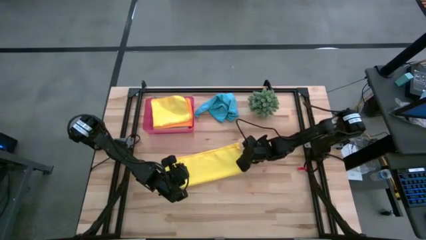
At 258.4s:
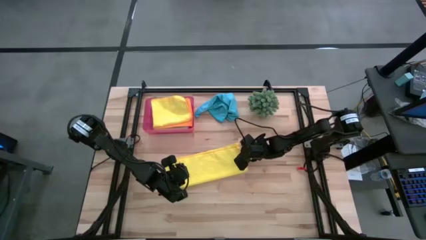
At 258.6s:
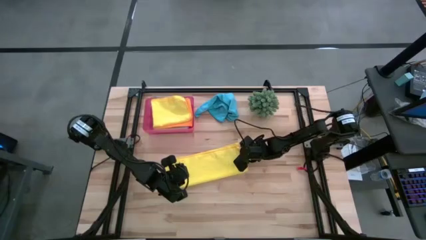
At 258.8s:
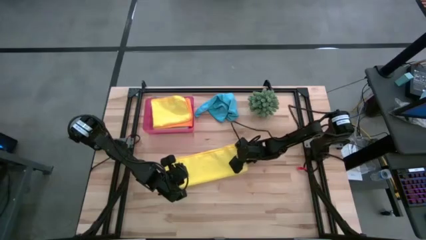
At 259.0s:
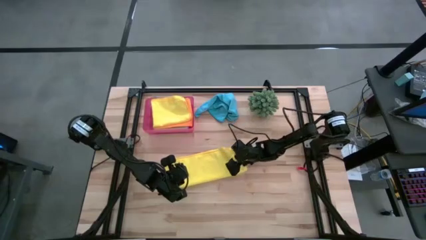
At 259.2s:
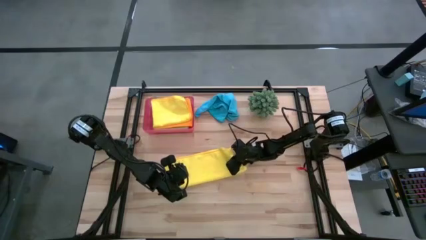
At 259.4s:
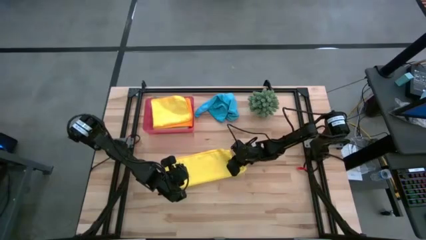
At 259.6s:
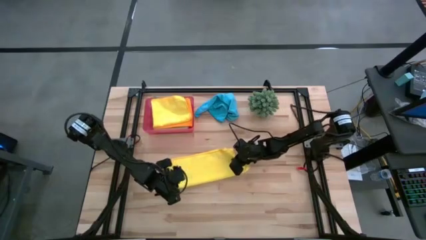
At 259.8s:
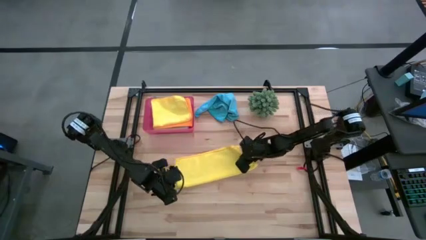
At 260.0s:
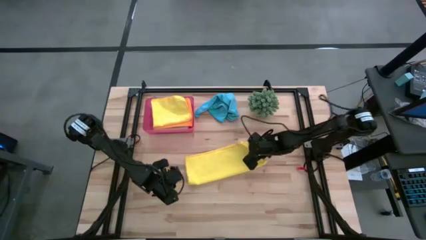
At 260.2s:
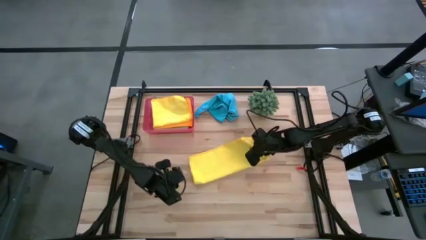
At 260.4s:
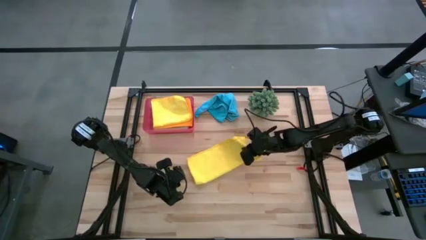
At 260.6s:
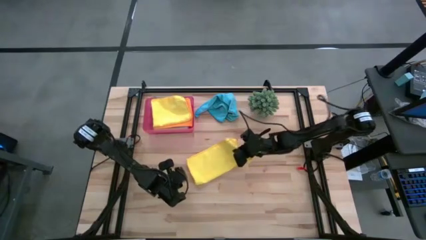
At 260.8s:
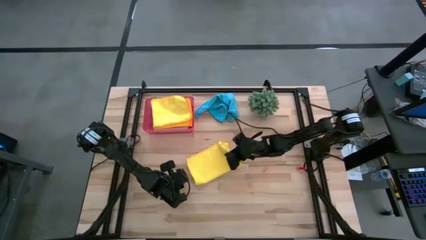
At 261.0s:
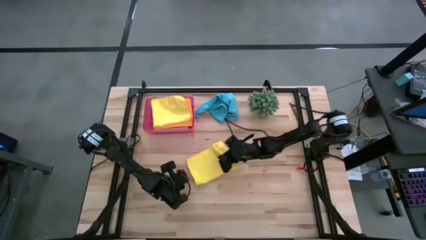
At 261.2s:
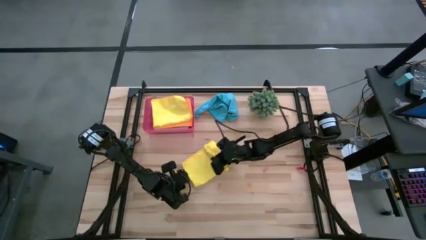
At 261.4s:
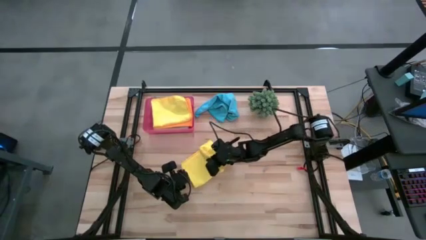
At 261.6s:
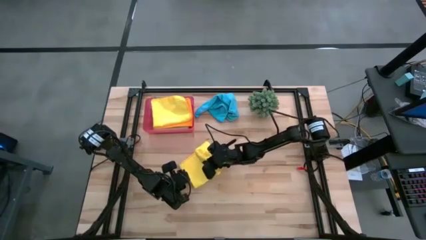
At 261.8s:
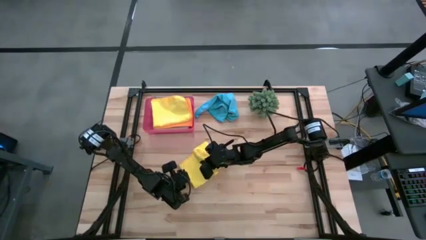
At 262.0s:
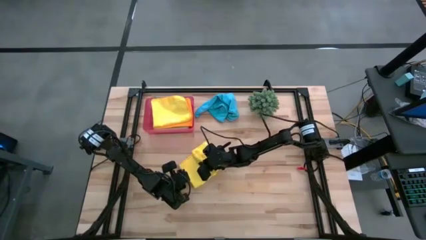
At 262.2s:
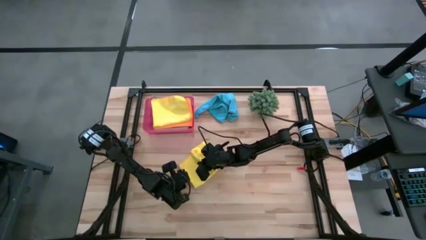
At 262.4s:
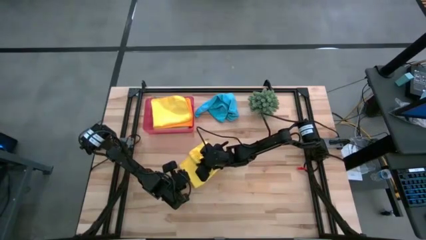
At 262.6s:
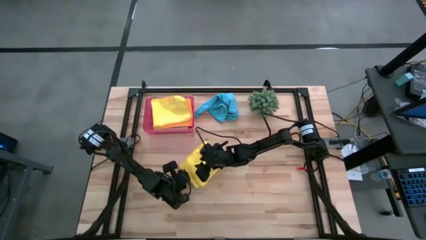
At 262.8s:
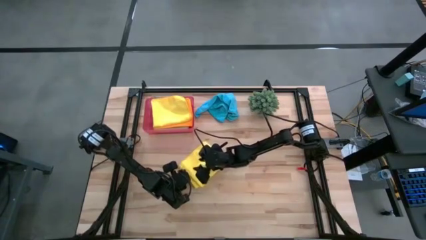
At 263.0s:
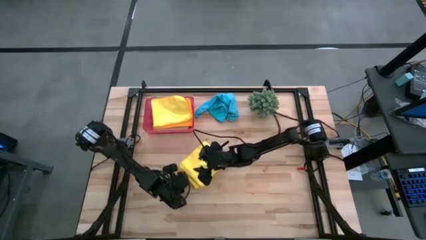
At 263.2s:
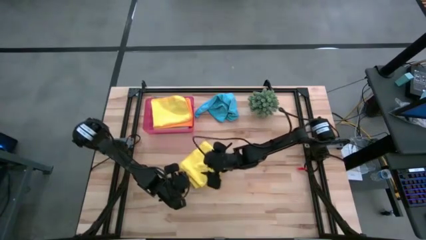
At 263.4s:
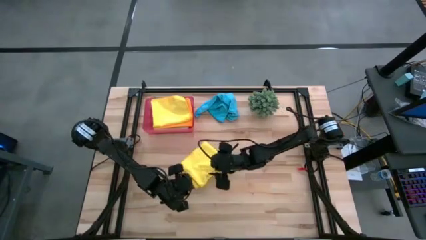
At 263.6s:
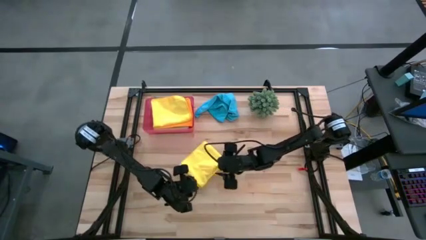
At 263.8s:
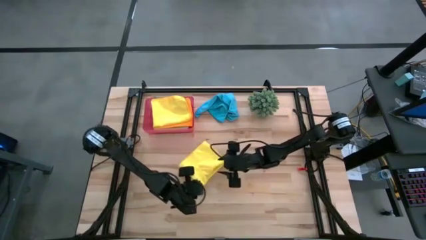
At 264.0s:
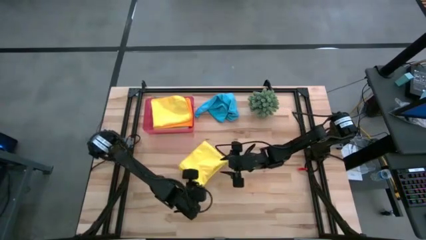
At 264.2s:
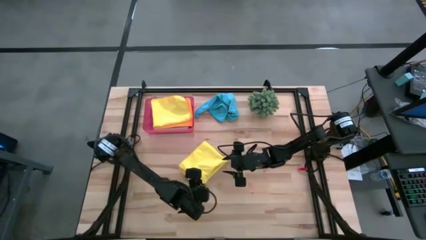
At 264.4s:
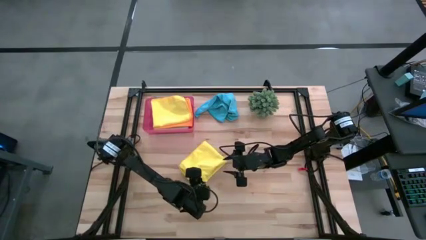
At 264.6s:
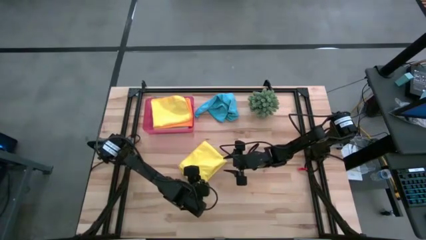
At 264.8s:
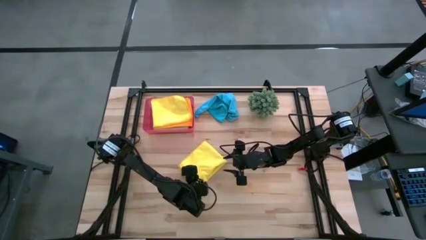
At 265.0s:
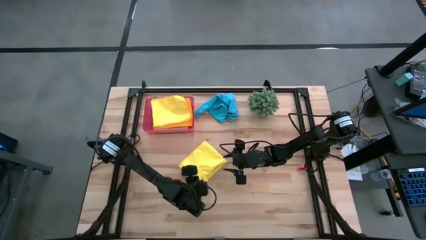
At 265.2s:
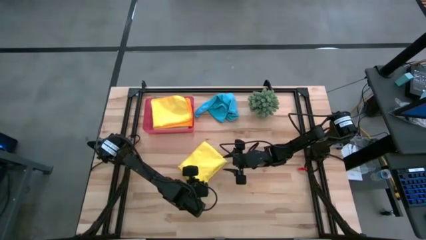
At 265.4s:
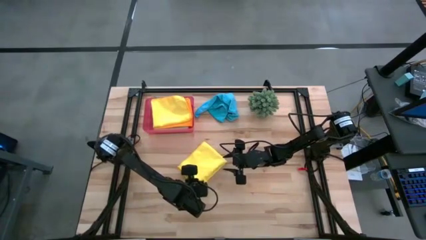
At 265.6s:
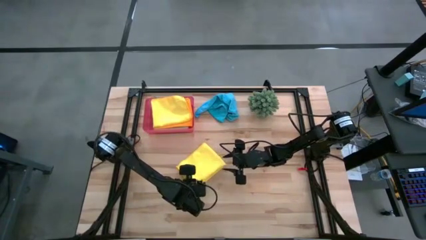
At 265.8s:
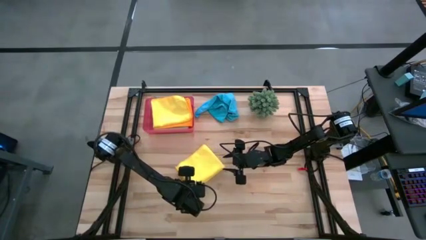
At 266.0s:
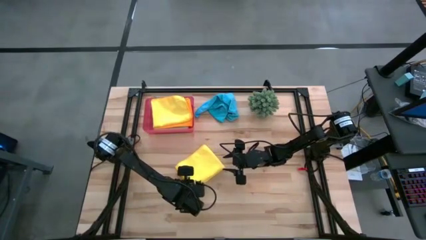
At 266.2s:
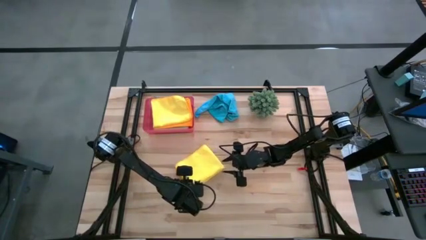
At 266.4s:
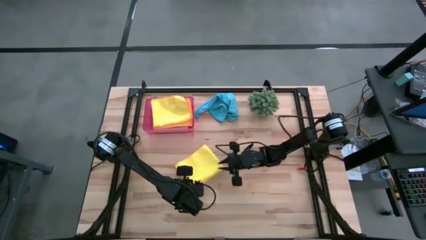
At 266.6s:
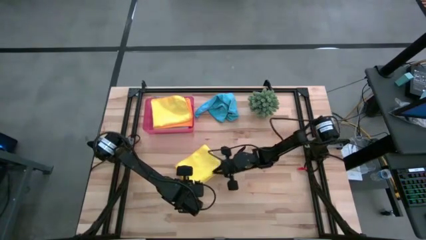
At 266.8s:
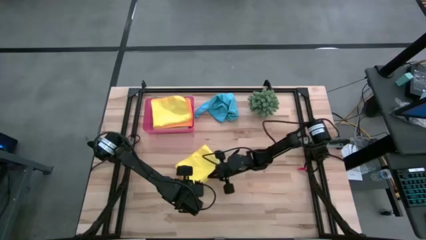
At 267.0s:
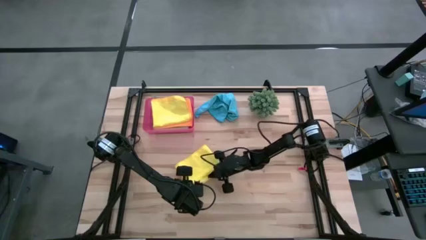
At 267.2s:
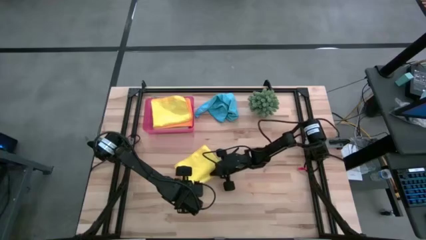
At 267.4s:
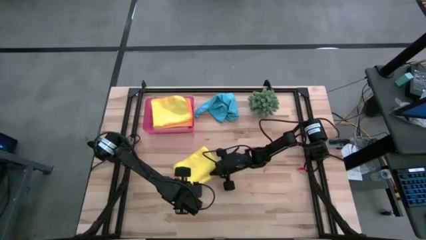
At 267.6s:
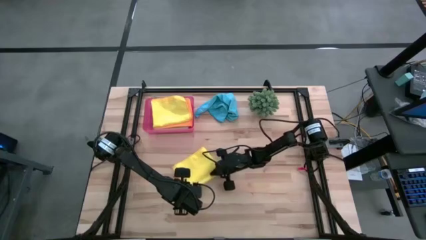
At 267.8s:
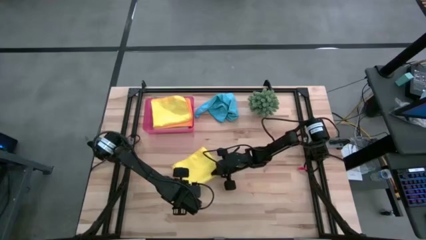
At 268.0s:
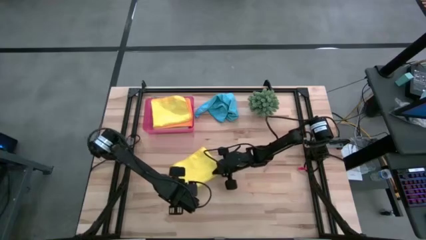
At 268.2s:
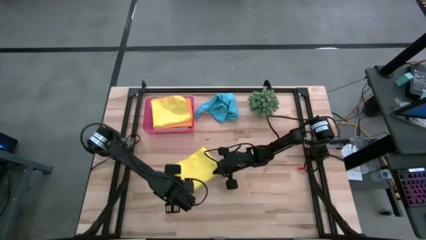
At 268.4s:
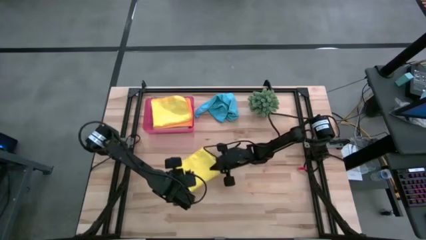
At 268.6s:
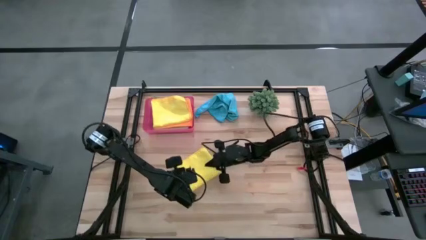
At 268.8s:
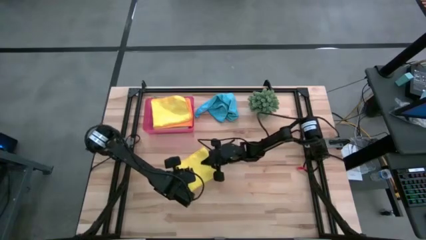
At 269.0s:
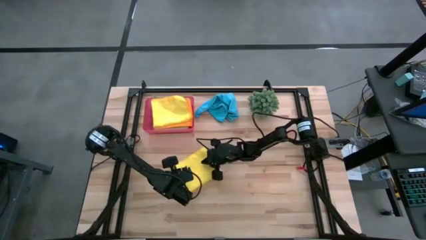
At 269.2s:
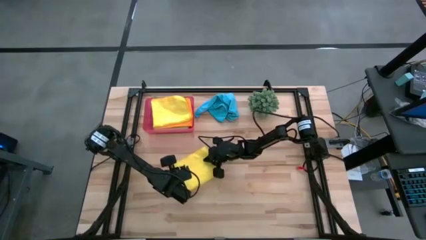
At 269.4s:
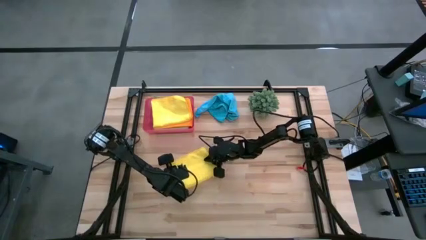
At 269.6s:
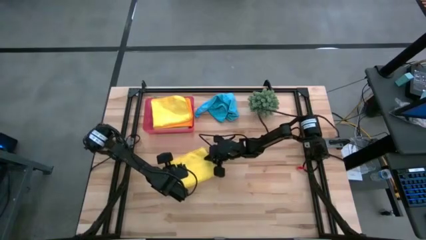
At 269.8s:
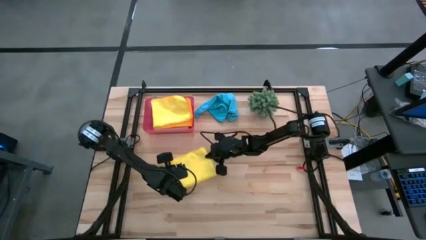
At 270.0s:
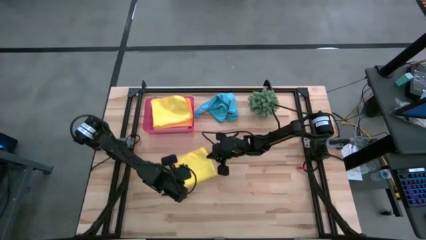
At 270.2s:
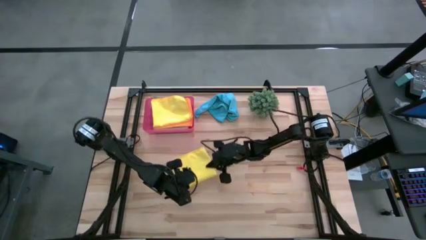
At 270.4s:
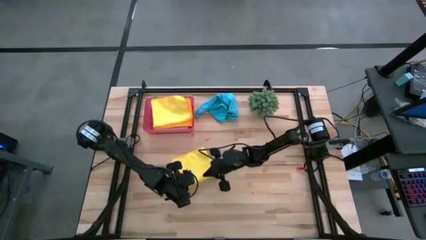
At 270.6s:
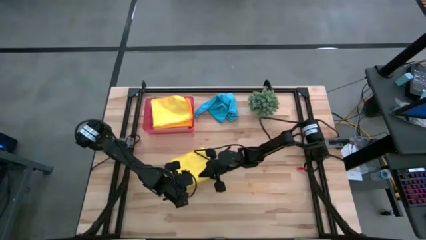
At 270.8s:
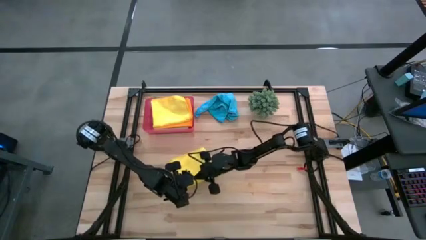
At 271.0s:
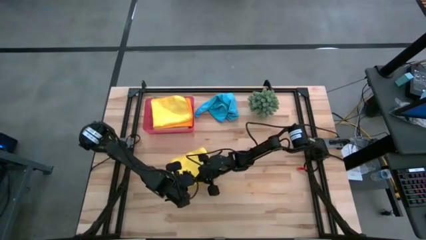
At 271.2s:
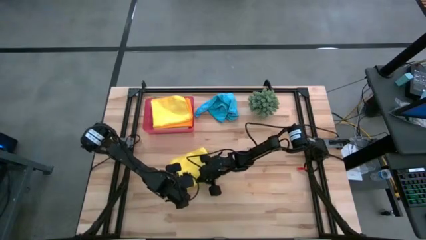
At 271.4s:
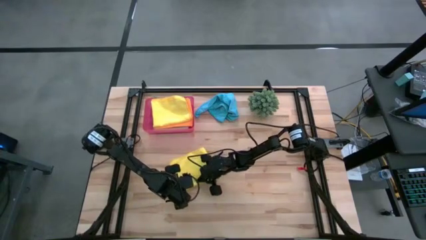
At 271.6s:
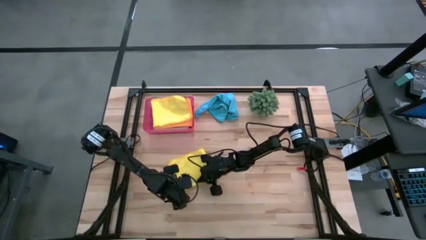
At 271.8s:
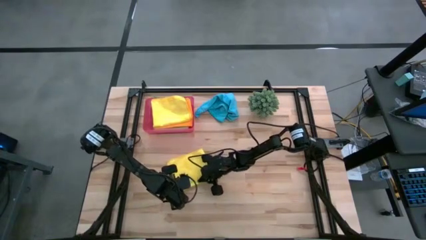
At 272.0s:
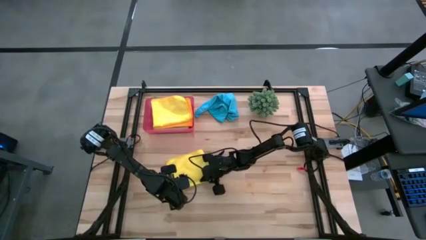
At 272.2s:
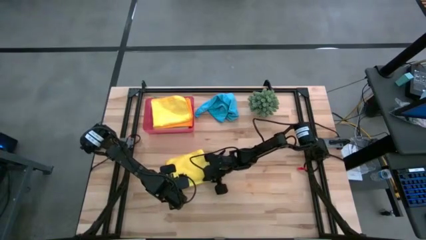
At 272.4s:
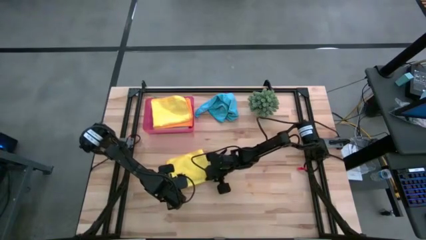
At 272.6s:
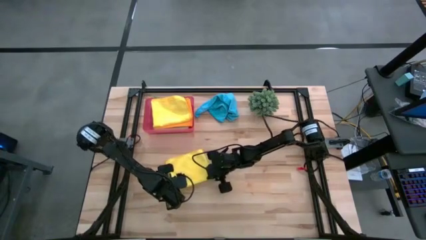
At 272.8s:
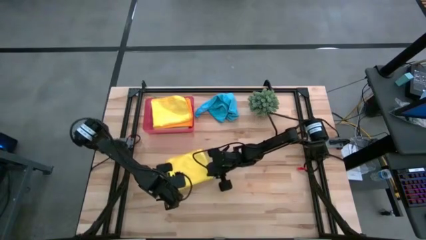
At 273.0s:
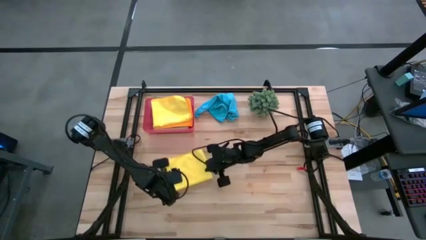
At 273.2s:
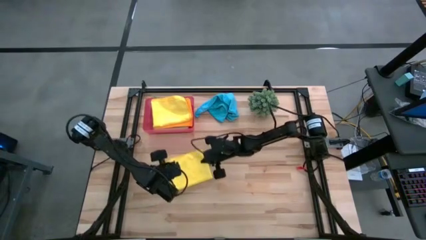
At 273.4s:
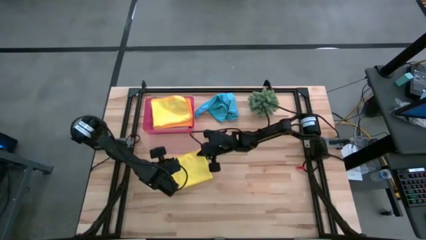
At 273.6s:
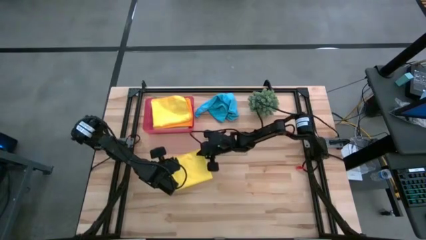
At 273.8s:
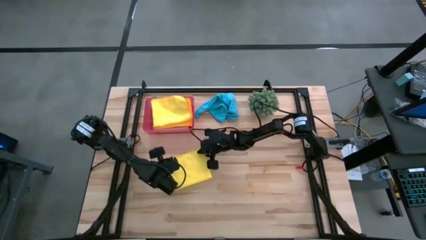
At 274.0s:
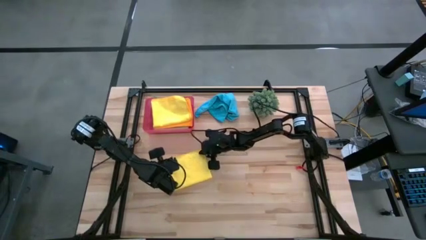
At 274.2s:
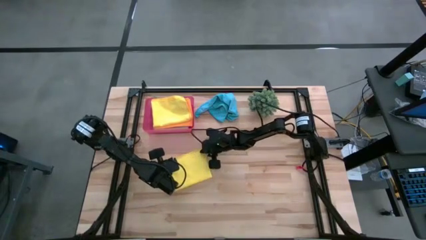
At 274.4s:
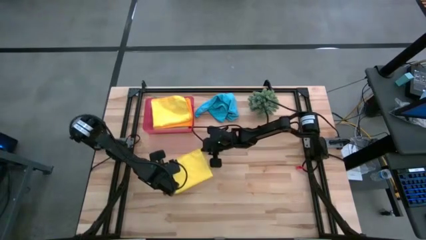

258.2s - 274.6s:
Task: Fold microfiber towels
Fold the yellow towel
